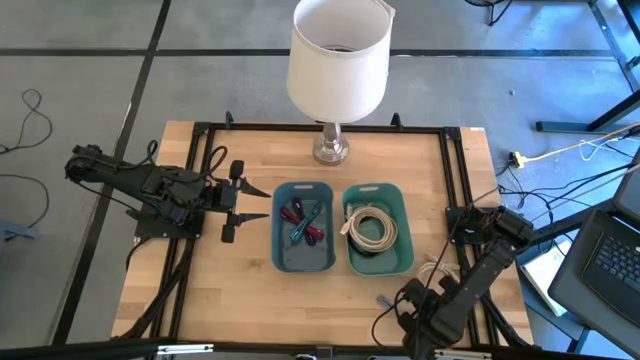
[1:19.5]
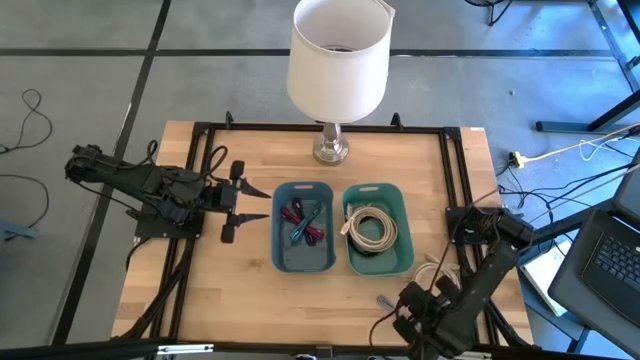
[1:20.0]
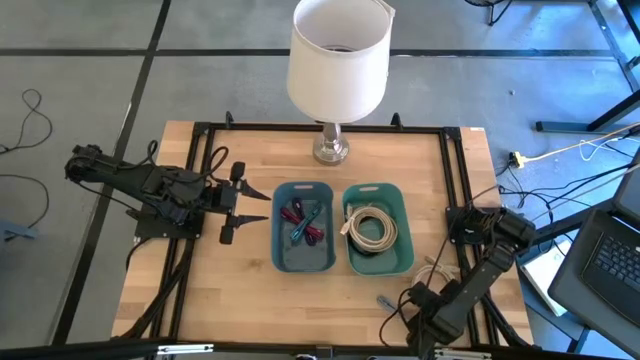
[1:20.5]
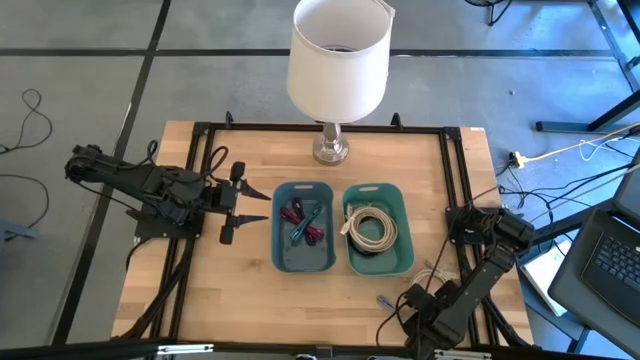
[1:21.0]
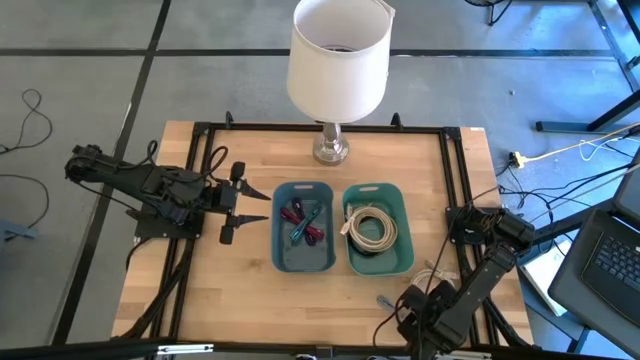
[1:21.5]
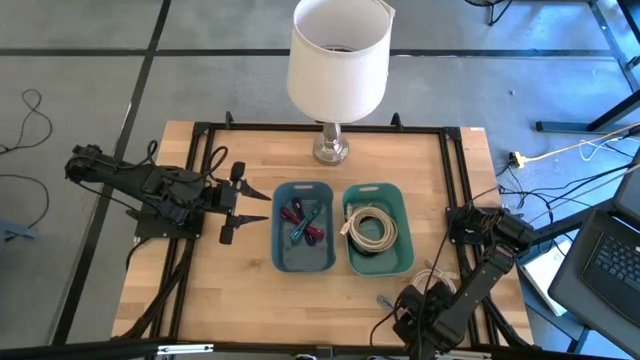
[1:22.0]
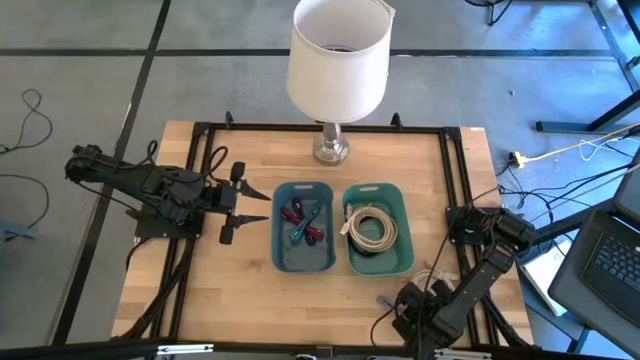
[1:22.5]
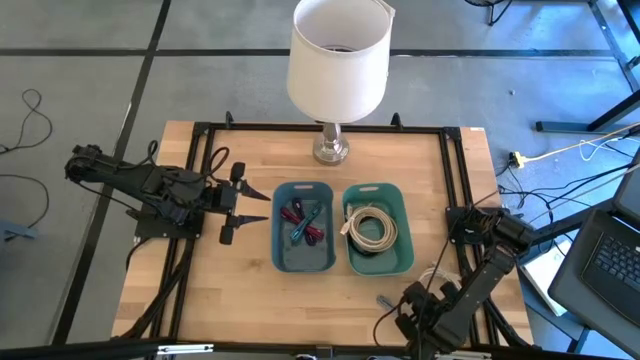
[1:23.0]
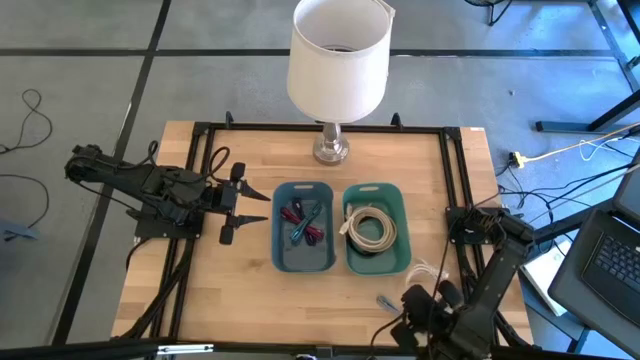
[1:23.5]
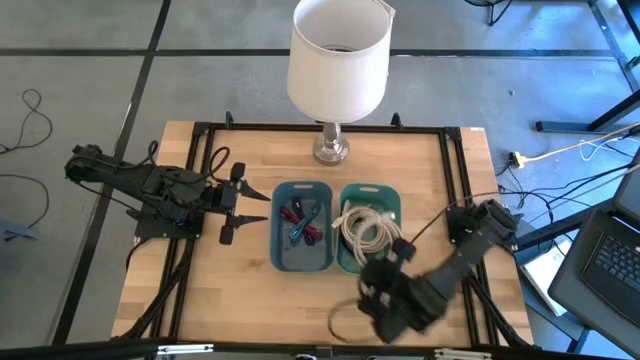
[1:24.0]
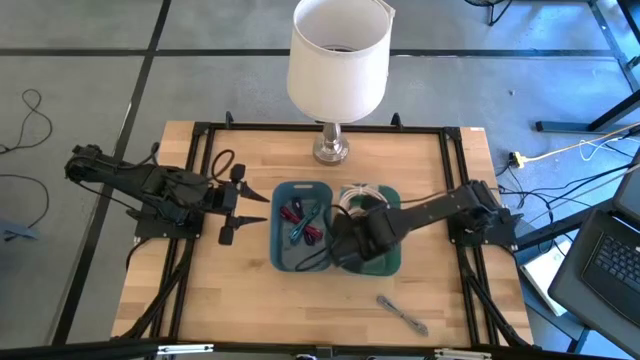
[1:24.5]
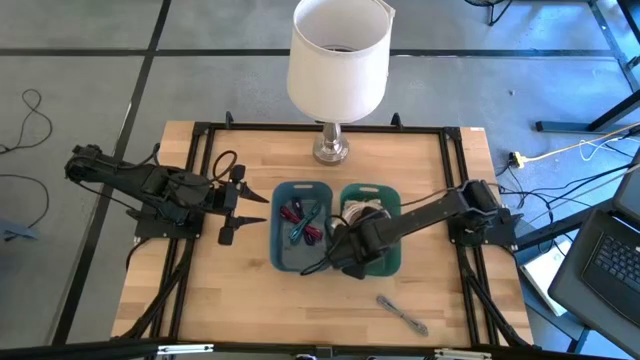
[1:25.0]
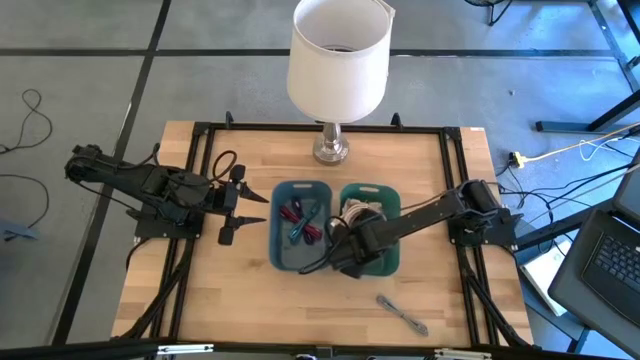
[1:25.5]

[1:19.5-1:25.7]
Task: Pick and place items into bin
Put the white HDMI cable into the green bin

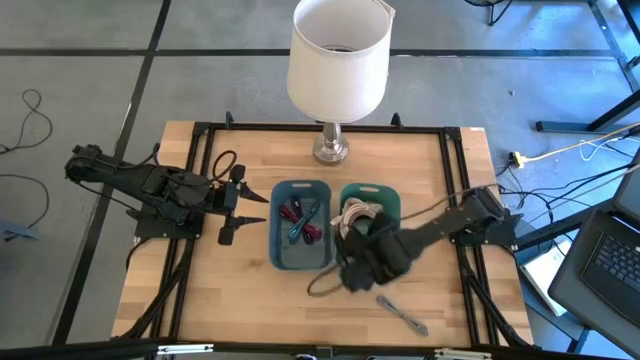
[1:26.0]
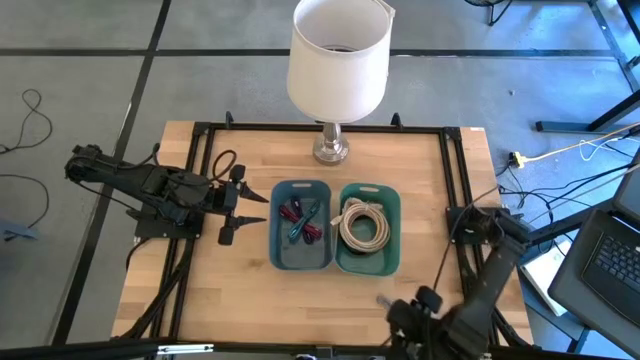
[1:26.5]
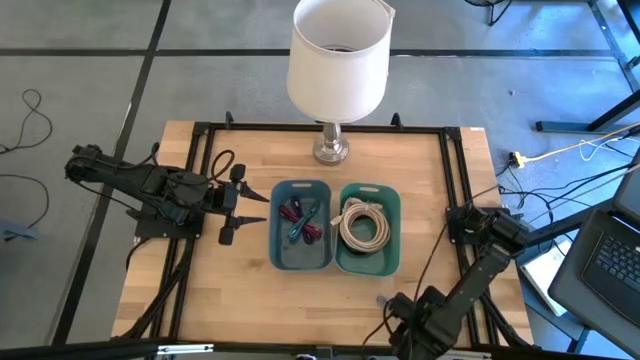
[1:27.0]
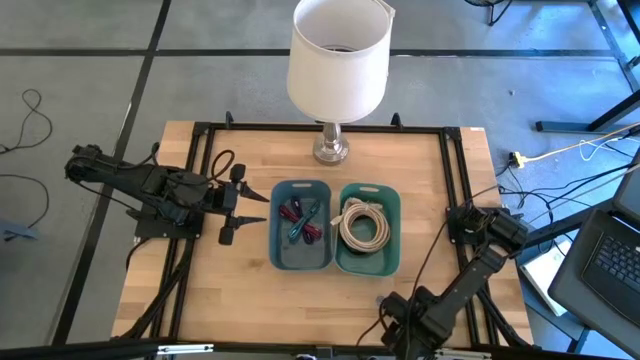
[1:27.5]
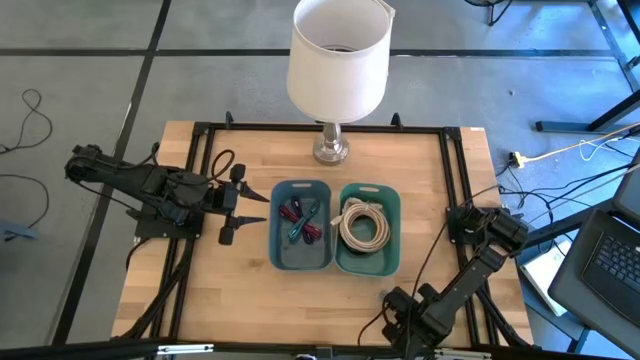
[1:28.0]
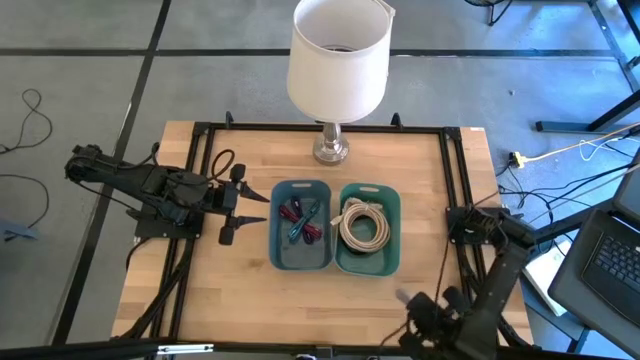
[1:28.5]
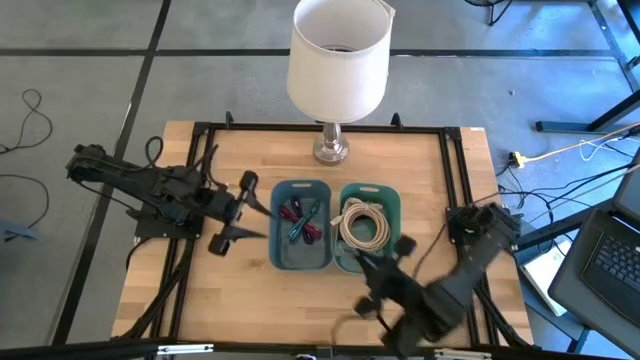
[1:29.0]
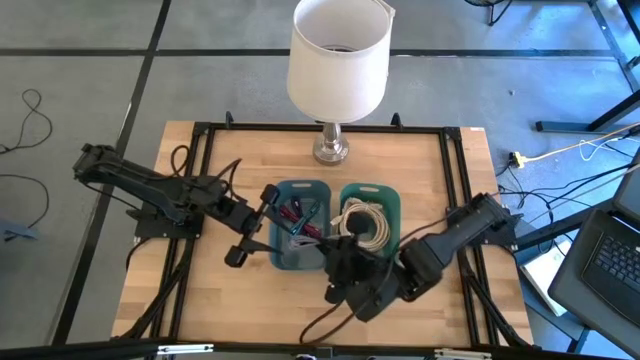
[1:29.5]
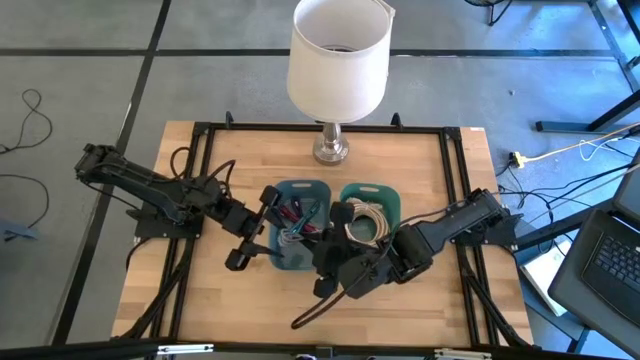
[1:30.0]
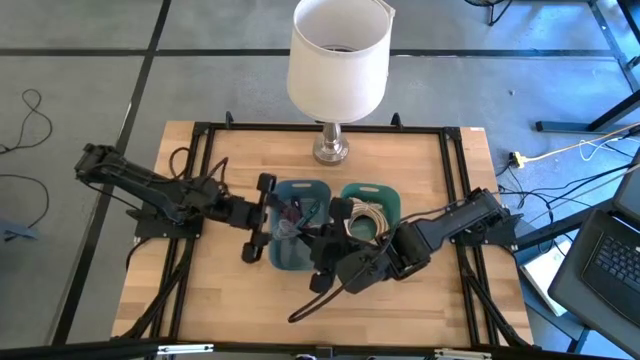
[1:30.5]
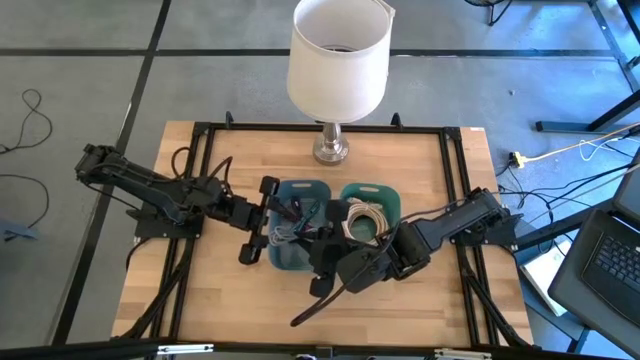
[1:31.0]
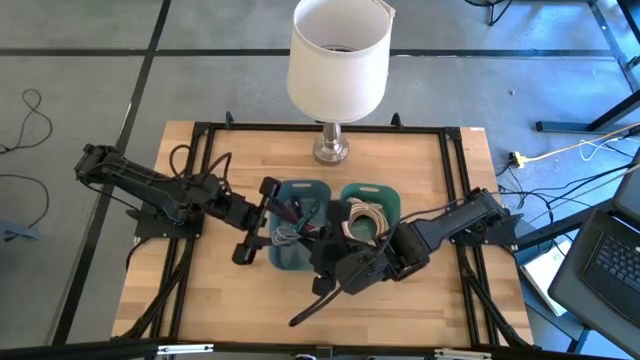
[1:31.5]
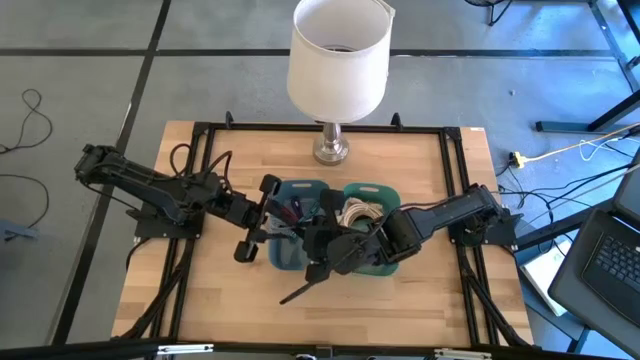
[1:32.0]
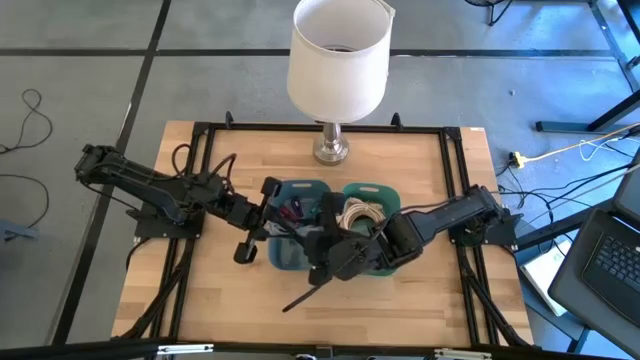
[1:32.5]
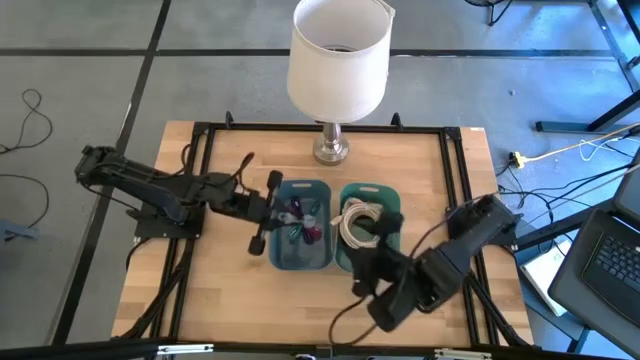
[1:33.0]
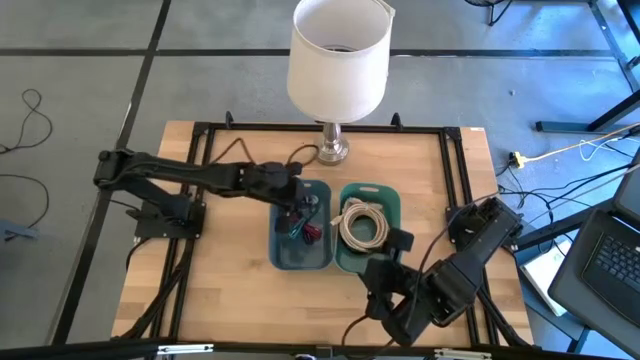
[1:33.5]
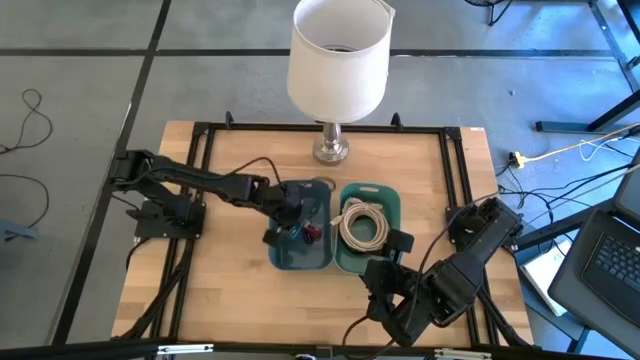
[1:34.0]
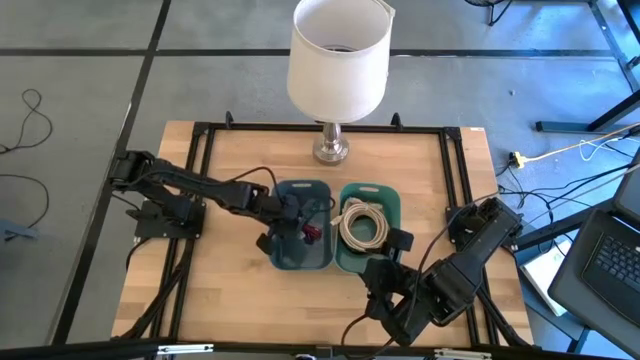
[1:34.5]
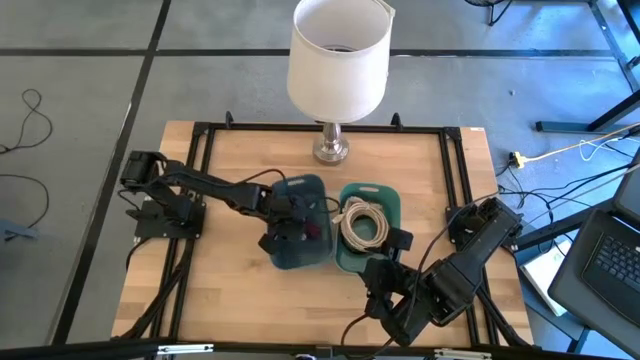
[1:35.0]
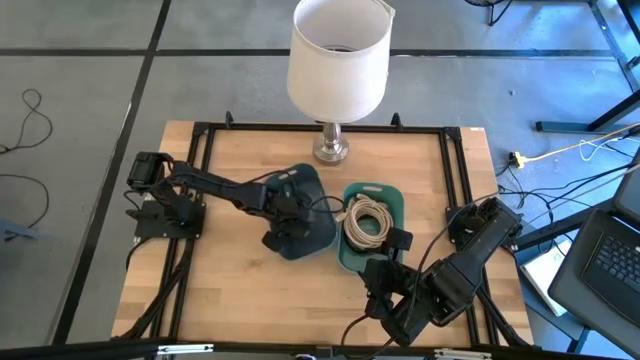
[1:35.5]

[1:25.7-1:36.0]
Put the white patterned USB cable into the blue bin

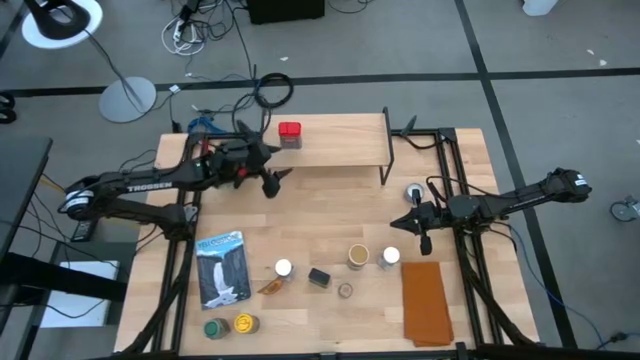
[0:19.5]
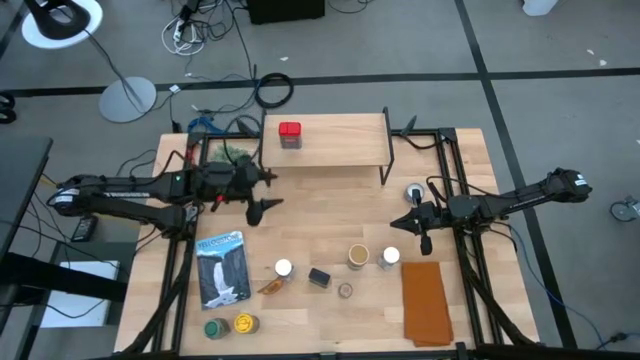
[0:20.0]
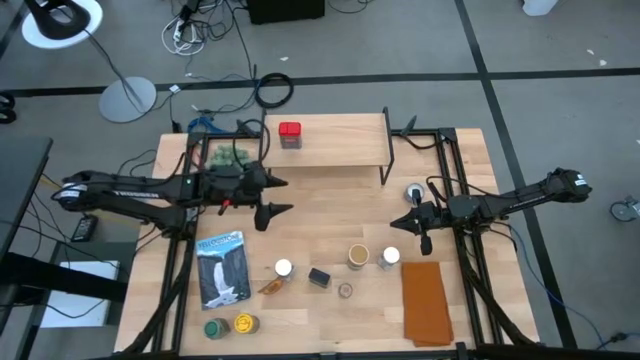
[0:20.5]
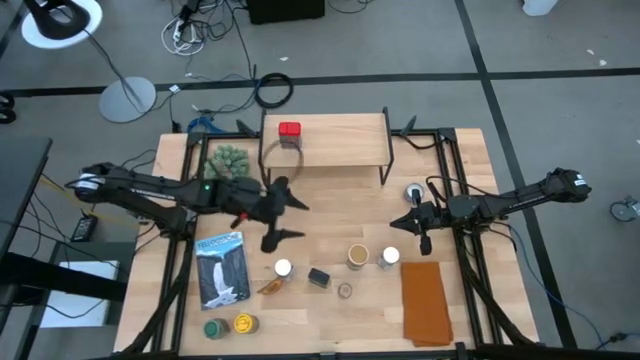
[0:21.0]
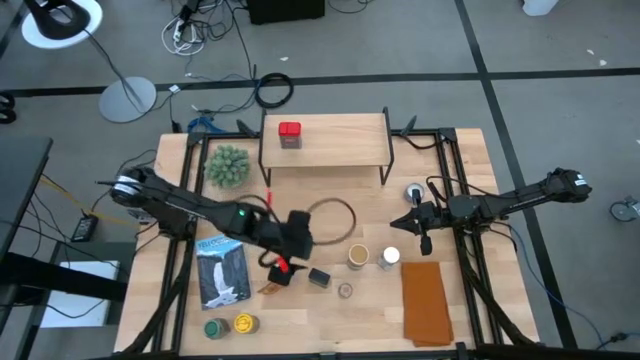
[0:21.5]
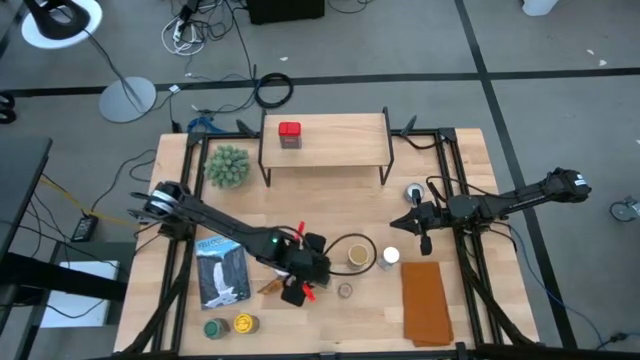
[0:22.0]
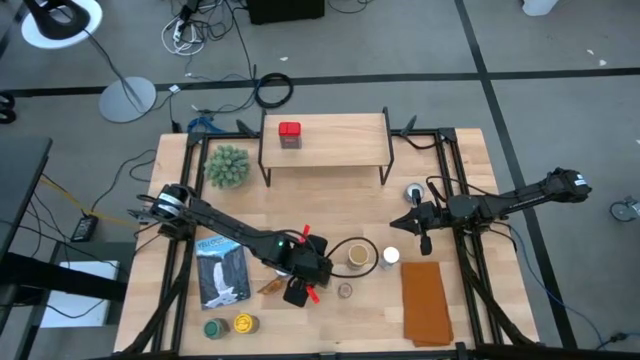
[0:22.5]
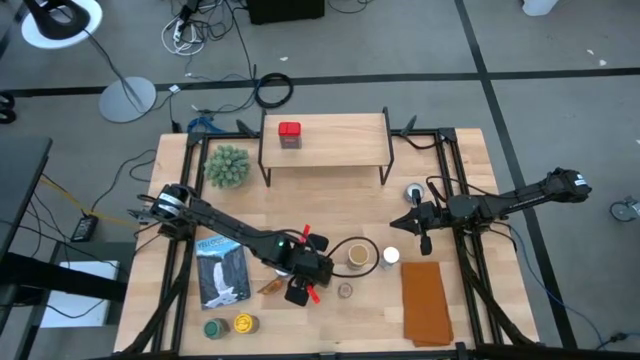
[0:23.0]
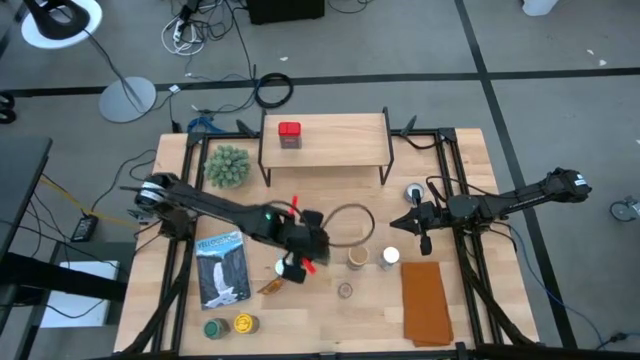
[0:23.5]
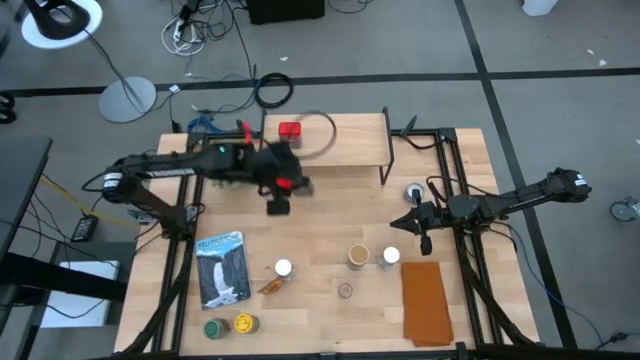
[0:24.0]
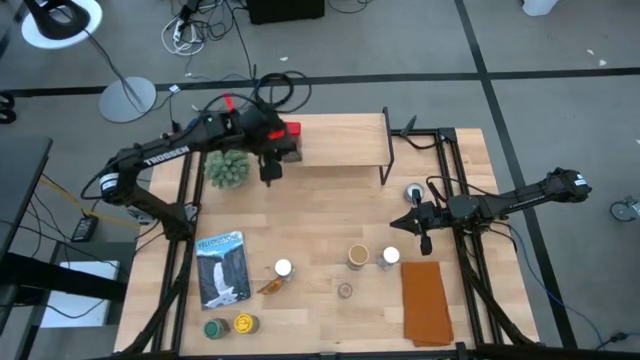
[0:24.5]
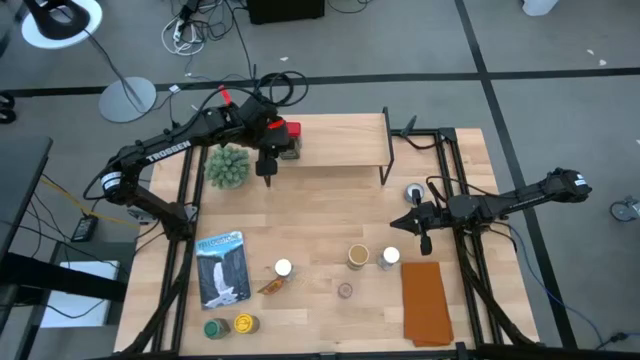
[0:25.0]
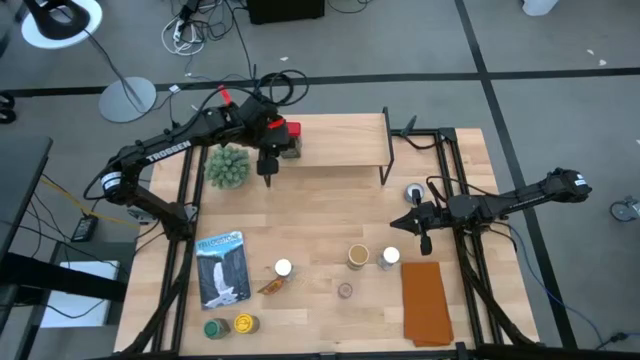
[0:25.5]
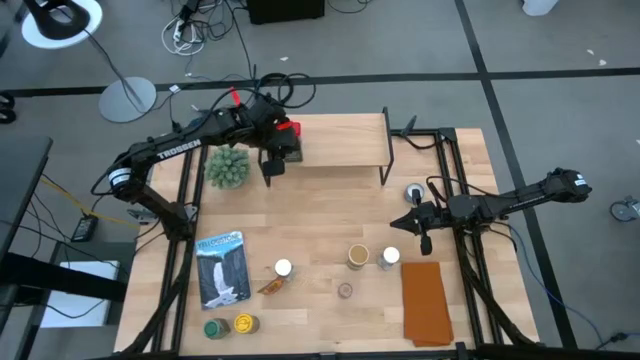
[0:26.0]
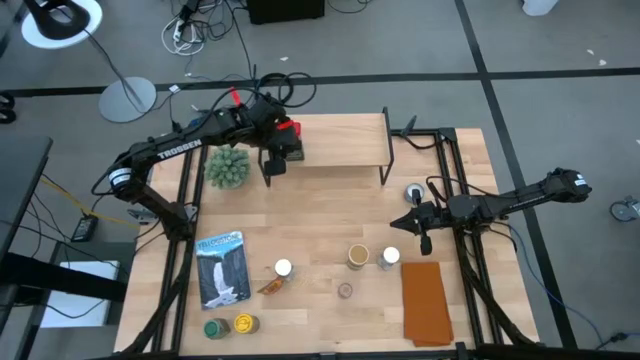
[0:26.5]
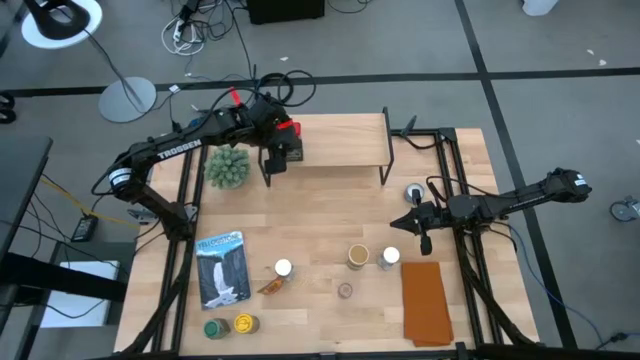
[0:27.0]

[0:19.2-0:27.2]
Task: Shelf spices
Put the black seasoning can on the shelf
